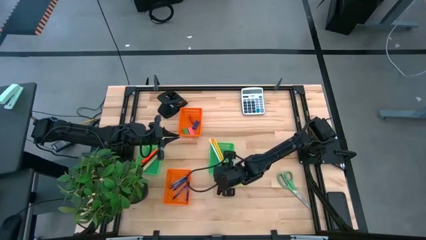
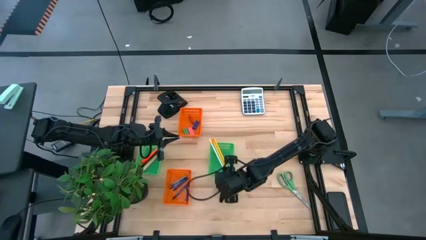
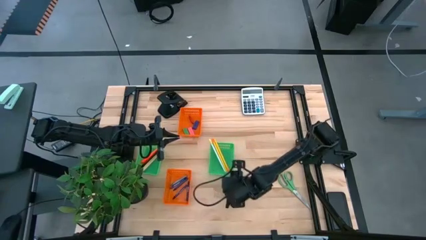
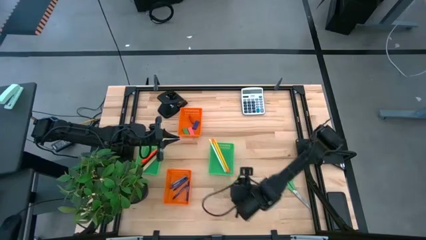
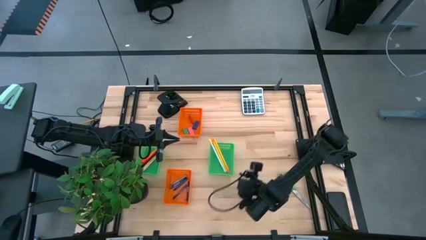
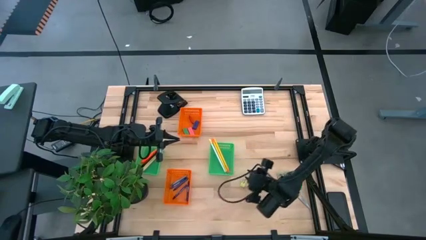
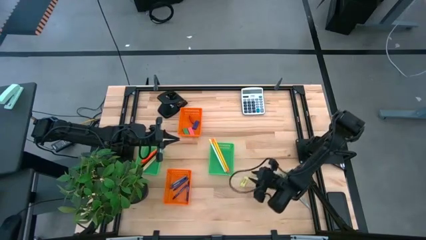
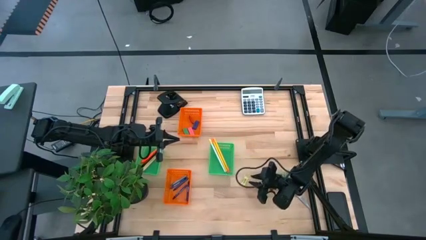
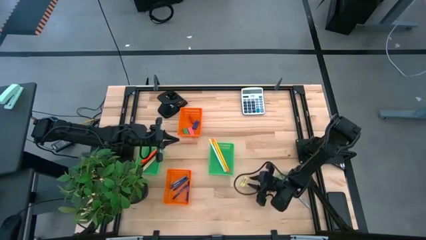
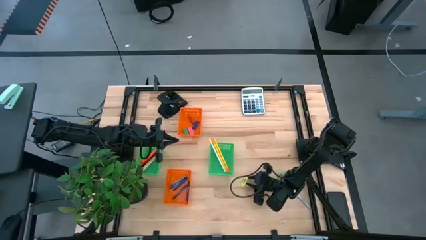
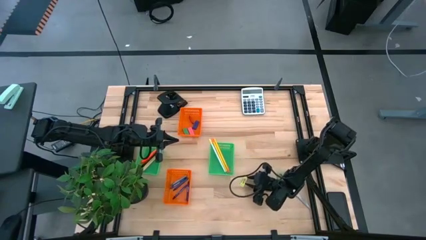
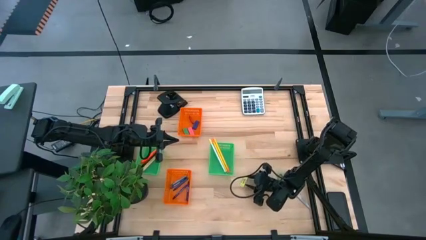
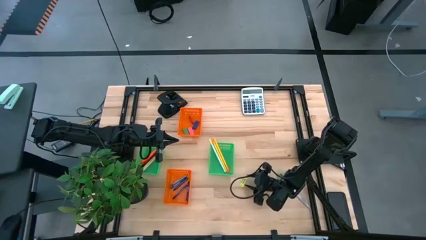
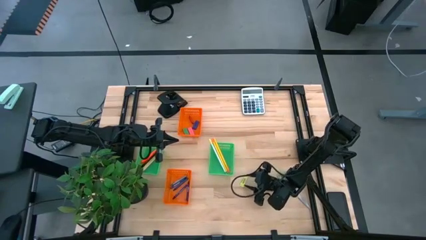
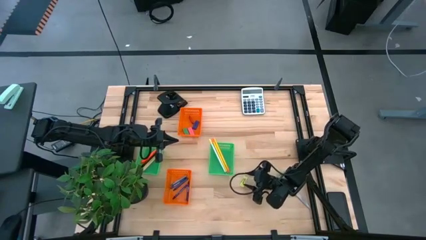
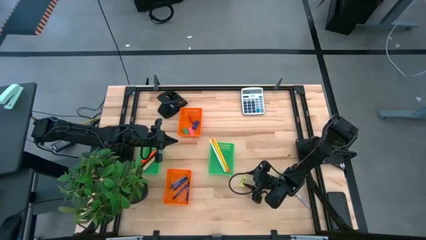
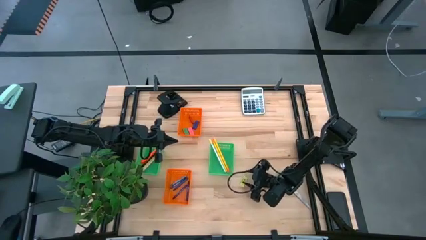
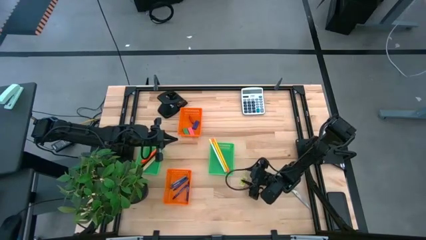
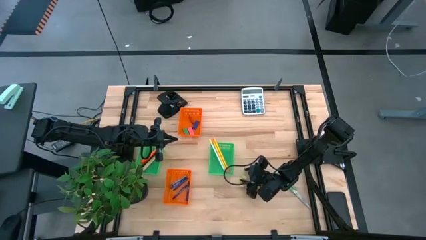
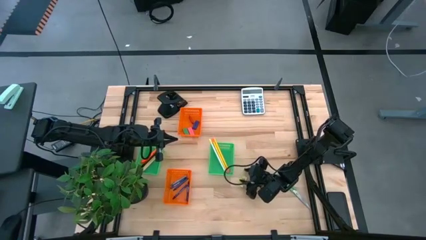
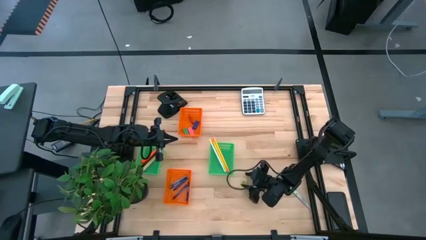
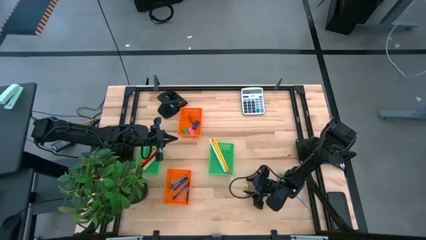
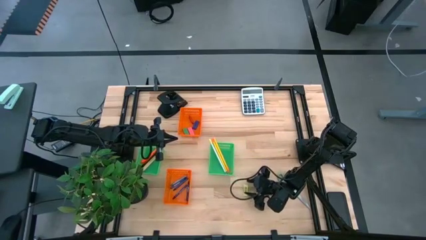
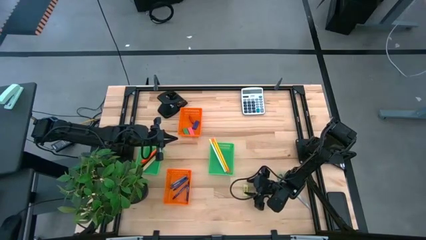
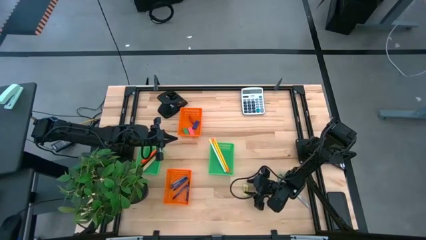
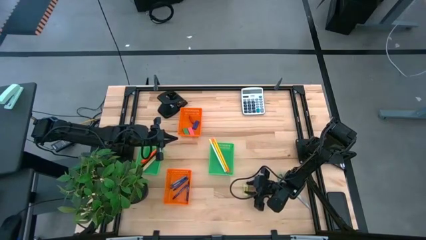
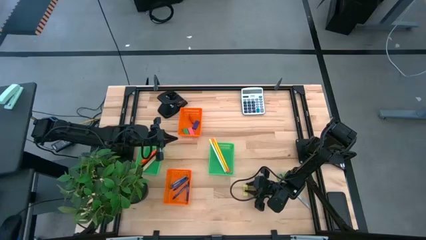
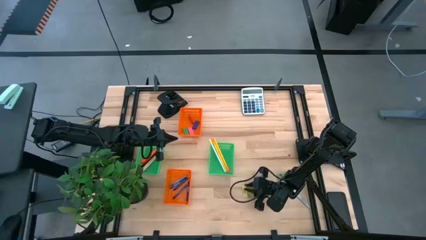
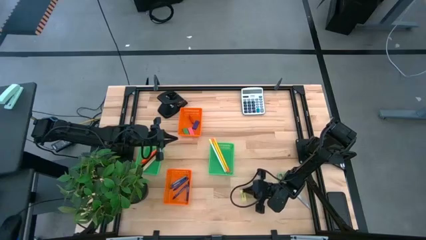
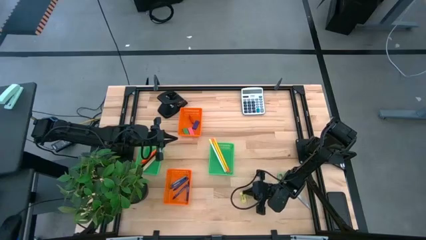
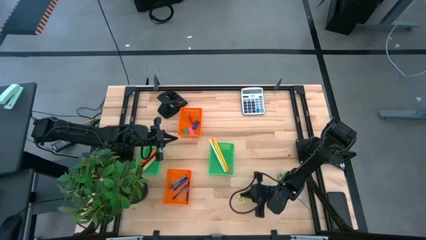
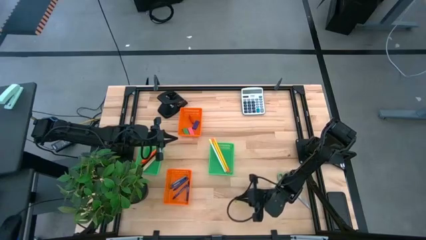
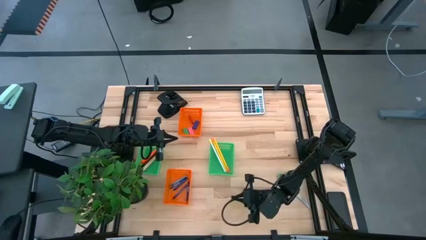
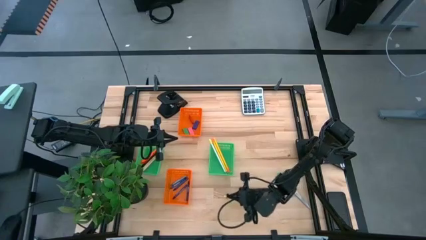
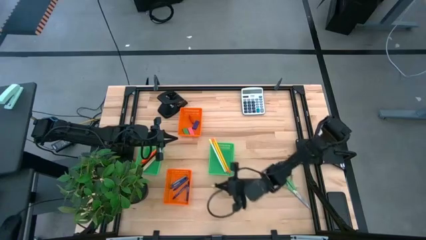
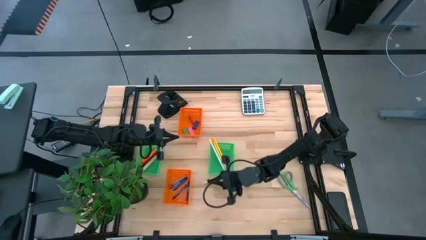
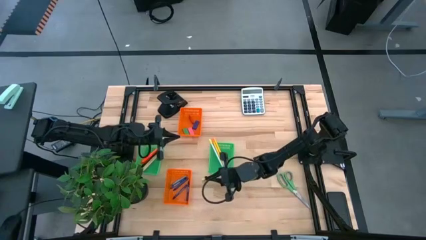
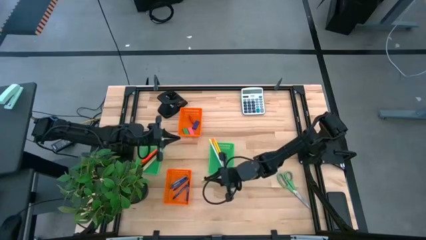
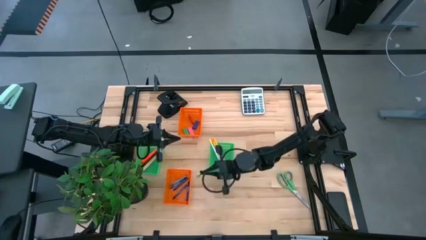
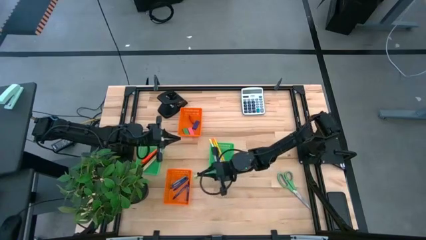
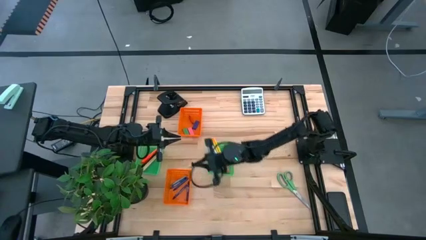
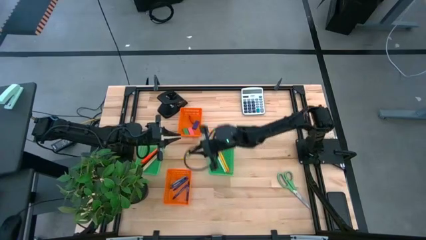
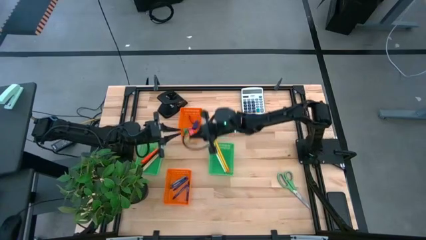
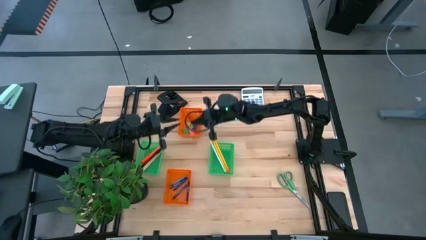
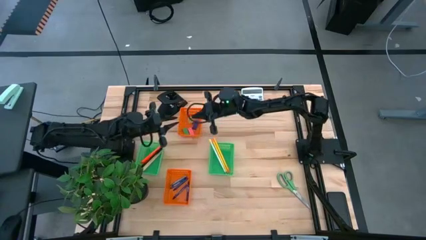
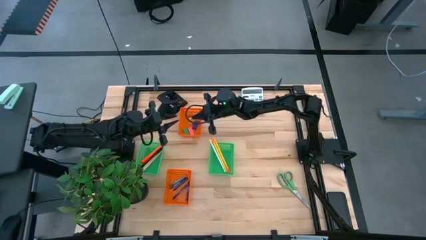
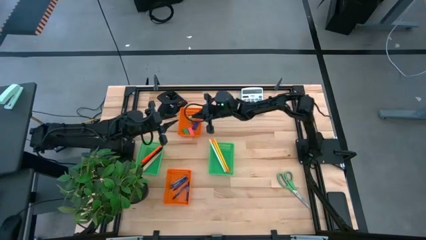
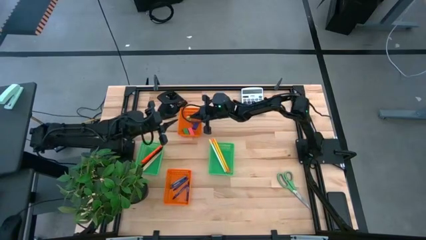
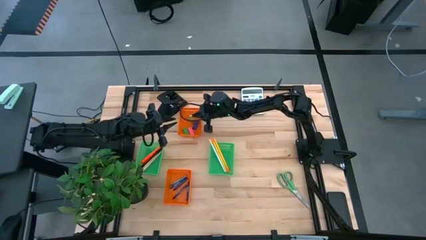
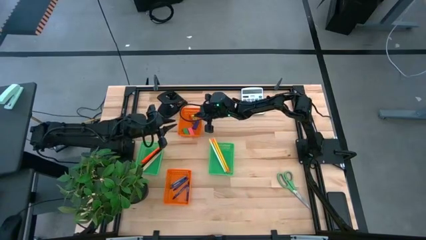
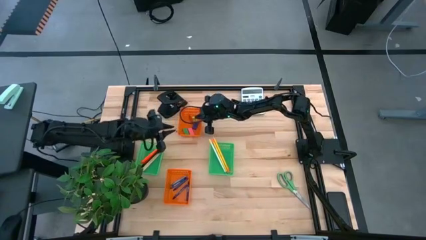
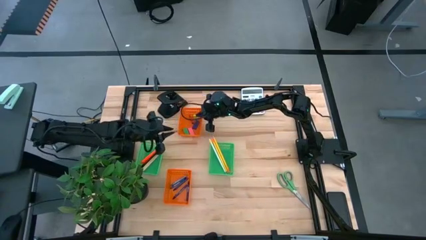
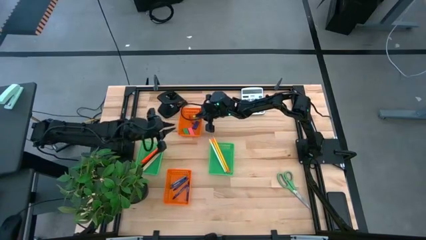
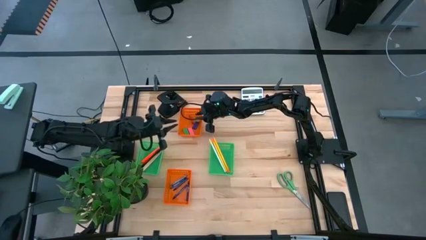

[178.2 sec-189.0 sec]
Task: Sort crayons/erasers/pens/pencils in bins
Put the yellow eraser into the top orange basket

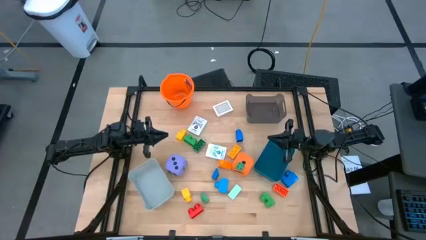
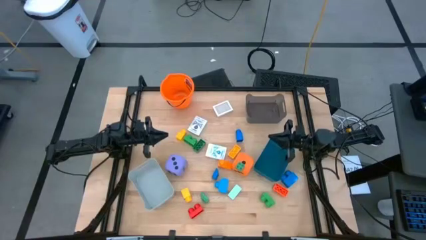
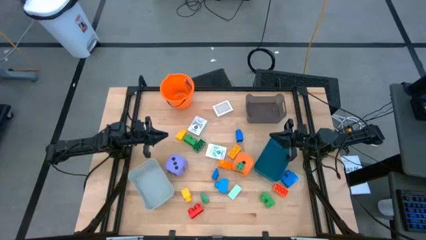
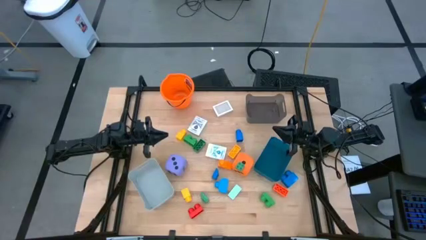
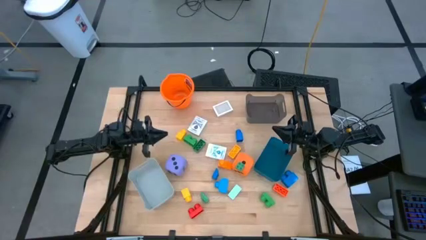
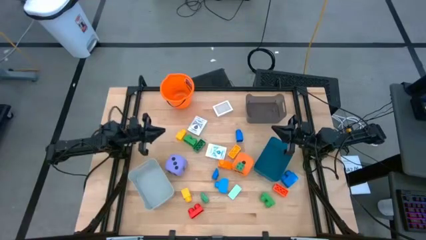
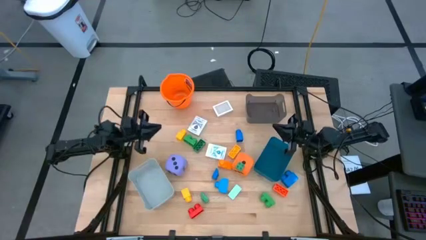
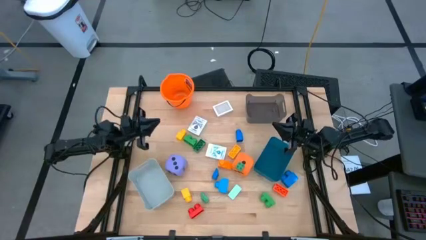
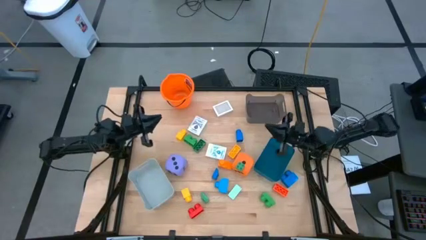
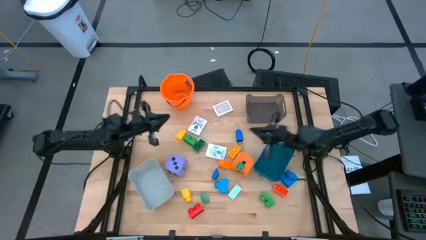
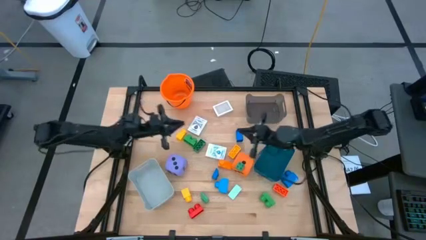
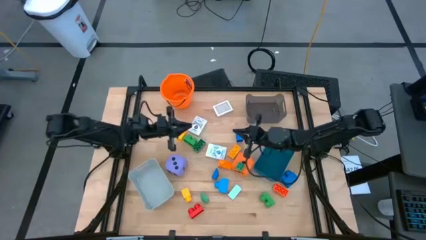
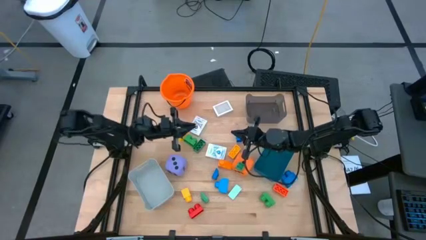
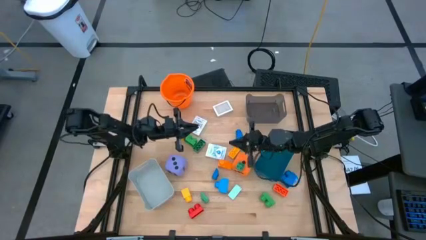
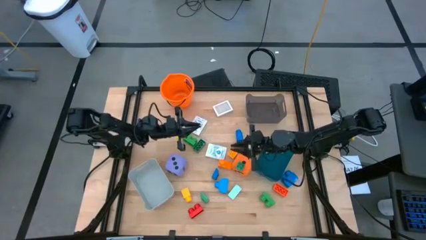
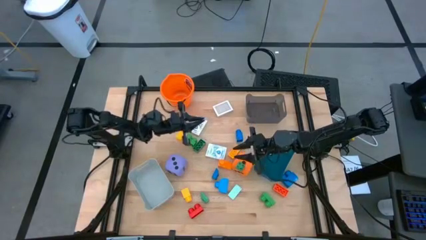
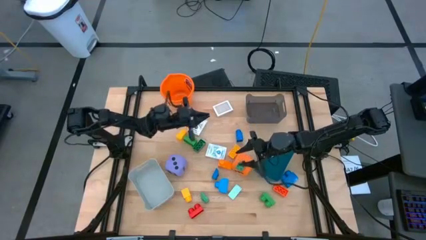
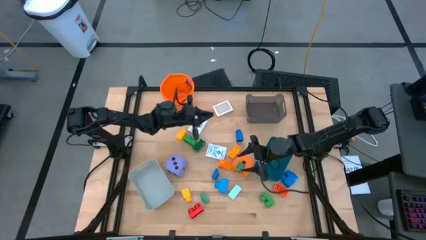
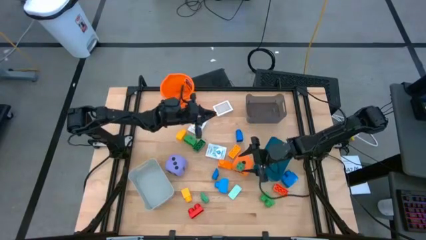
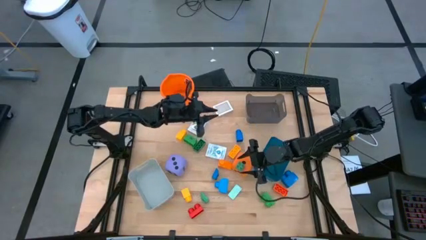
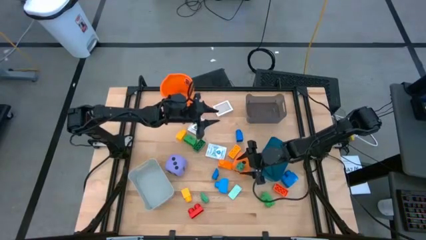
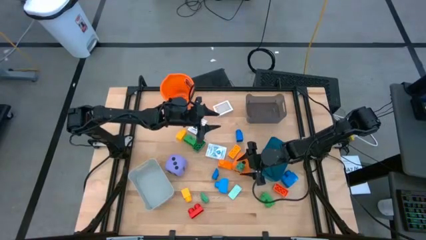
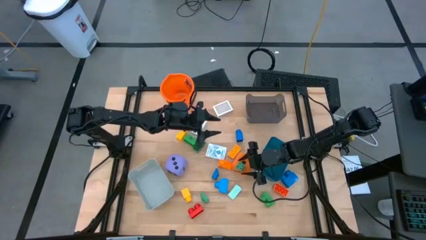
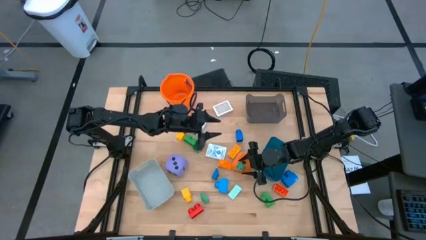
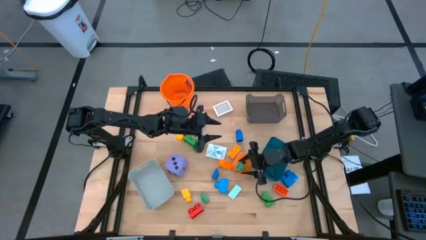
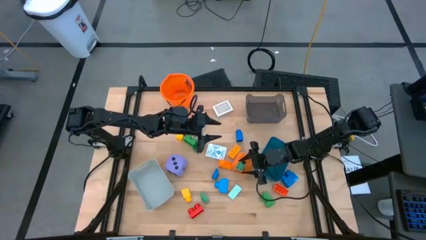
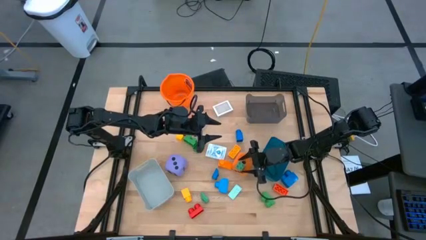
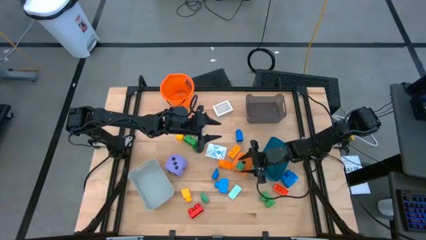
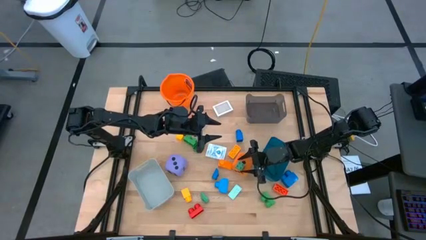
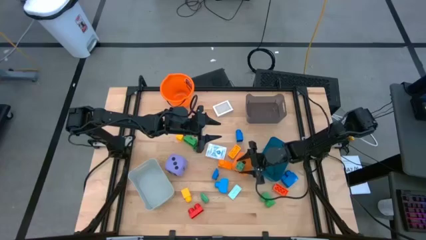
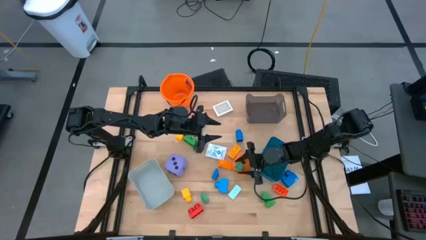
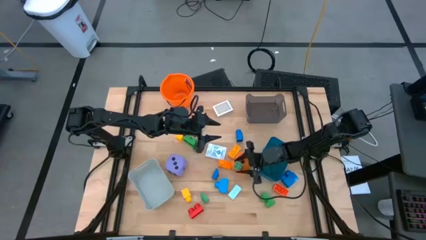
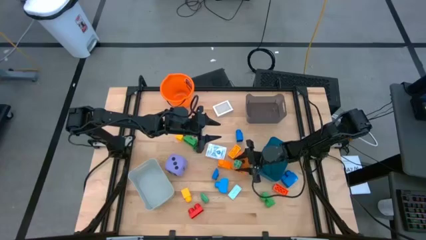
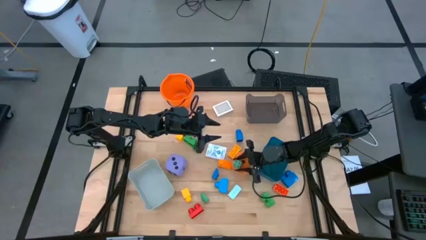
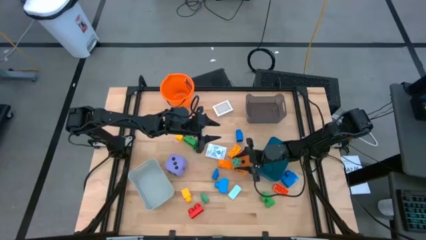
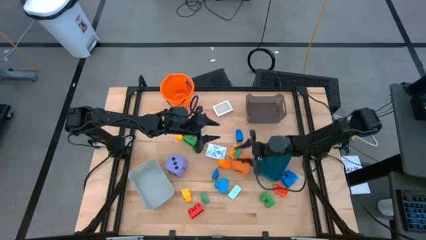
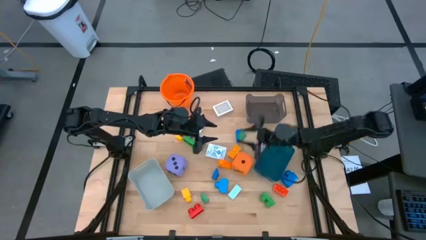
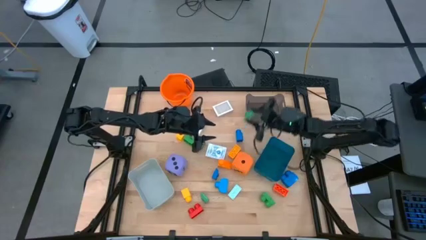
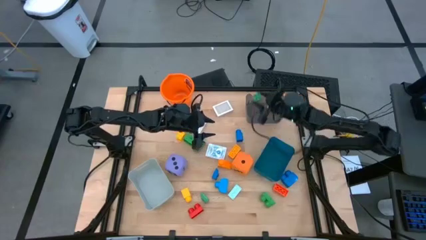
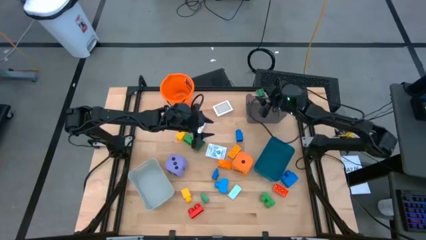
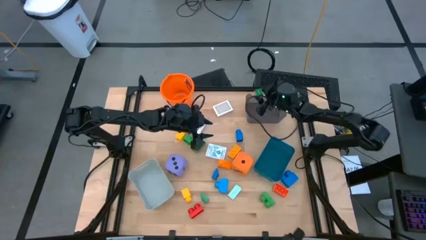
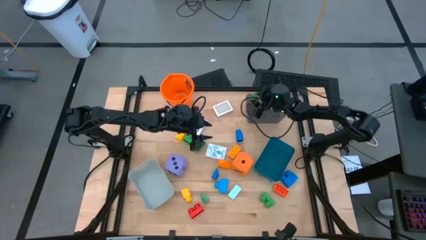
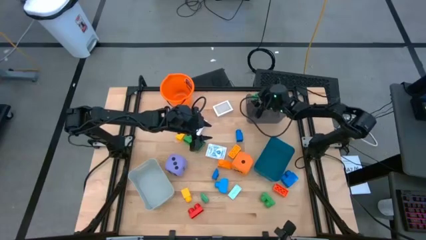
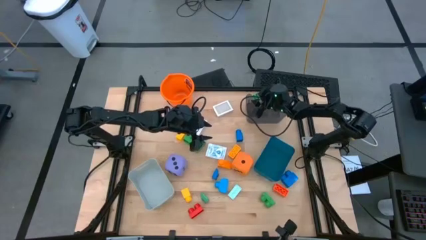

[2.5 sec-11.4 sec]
Task: Pick & Place Toys
Put the green game piece into the black bin
